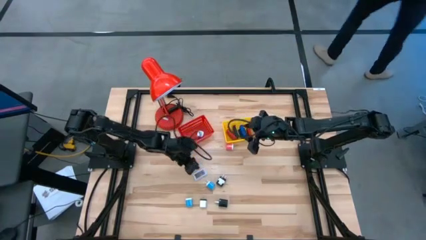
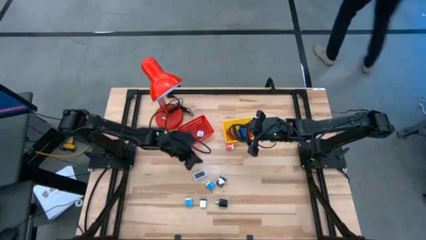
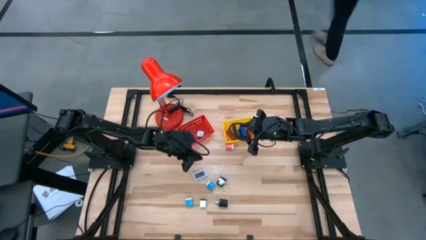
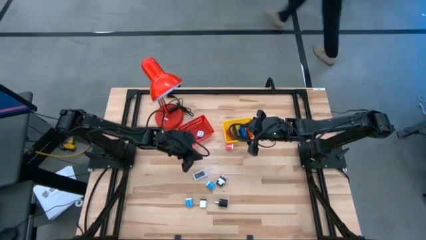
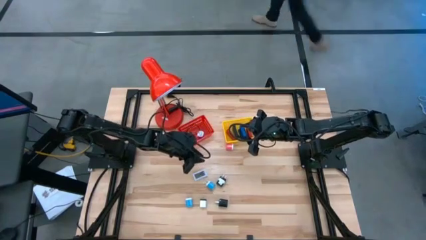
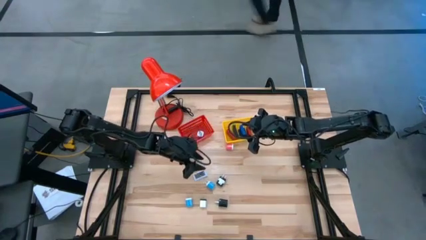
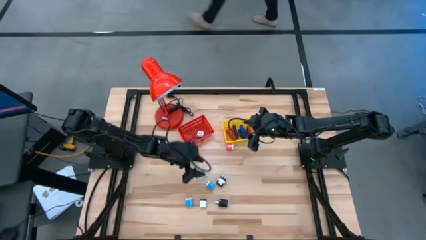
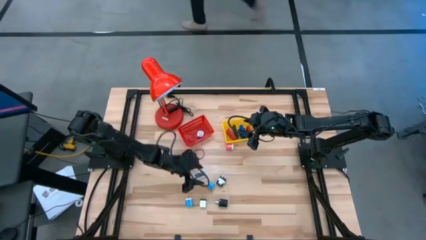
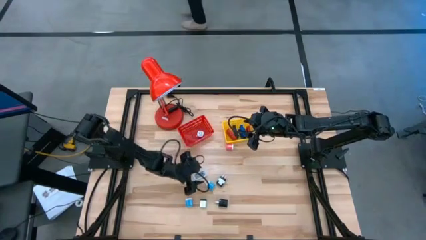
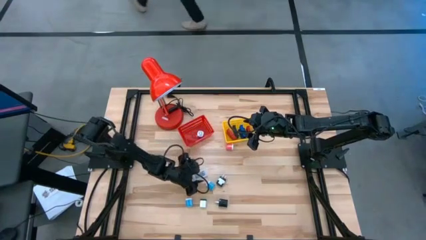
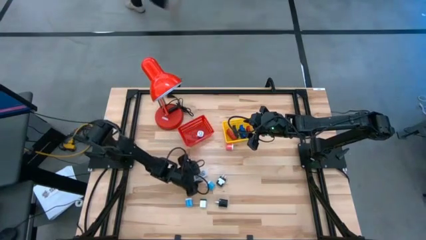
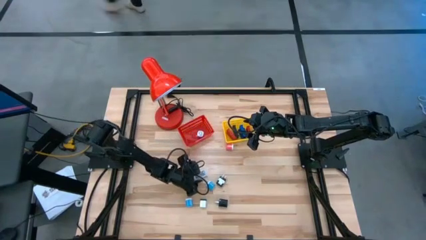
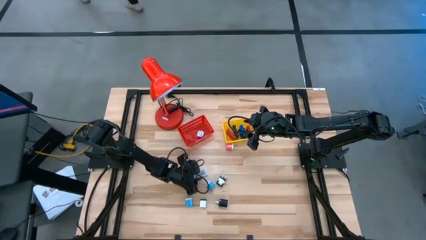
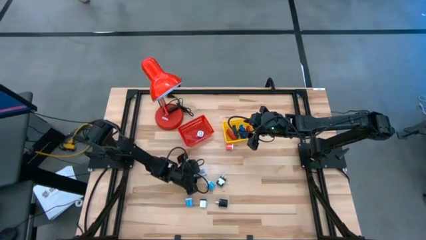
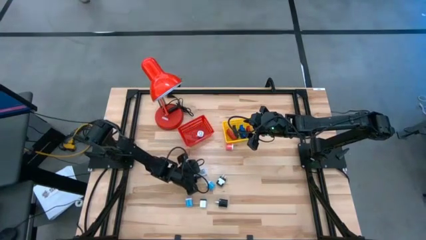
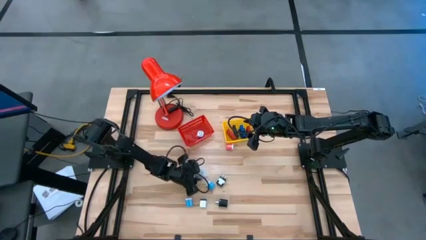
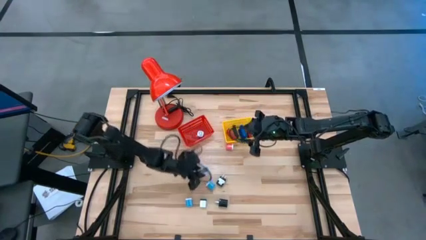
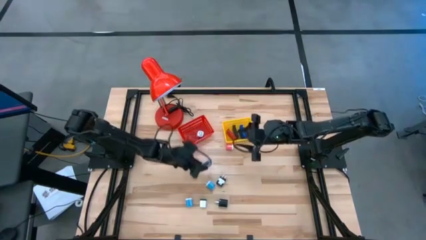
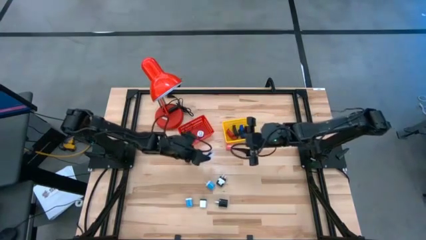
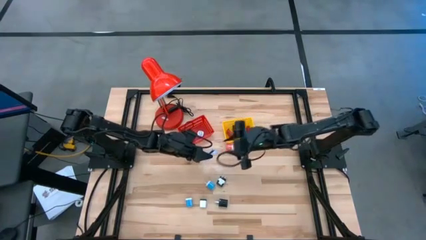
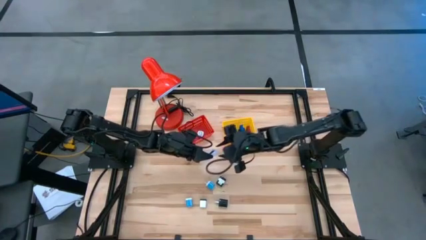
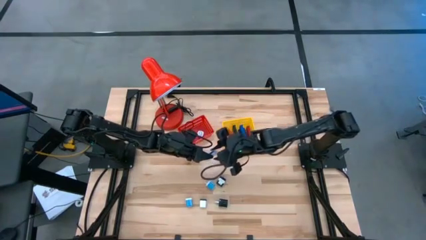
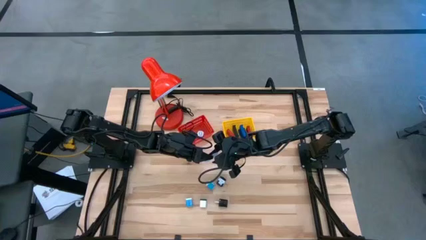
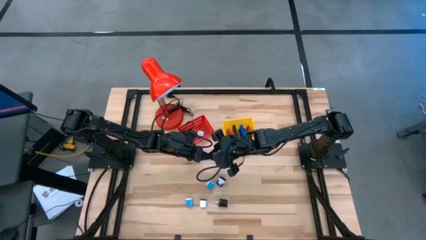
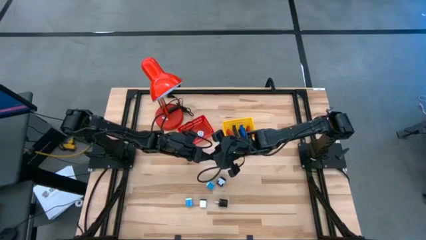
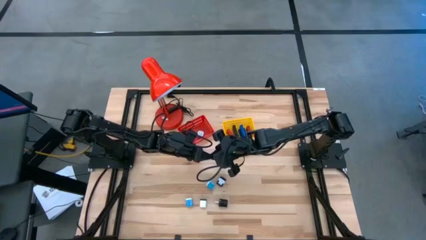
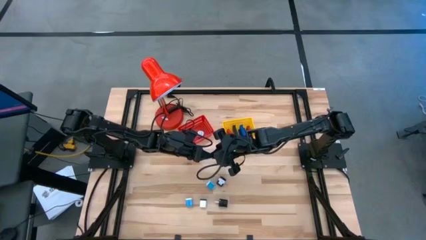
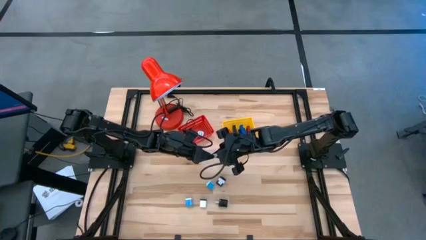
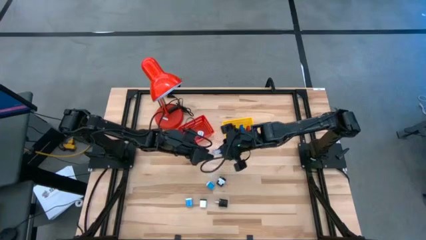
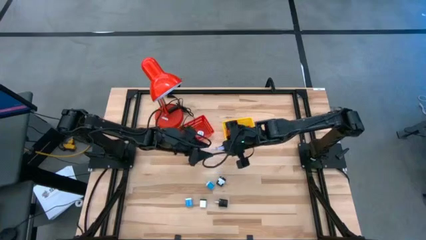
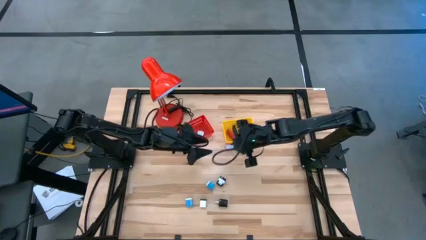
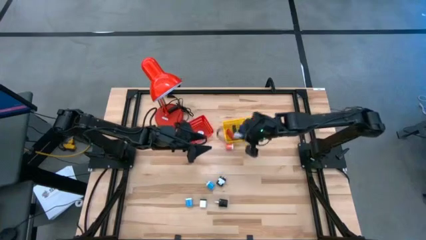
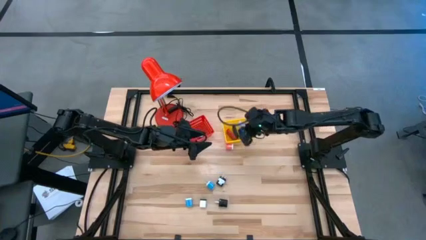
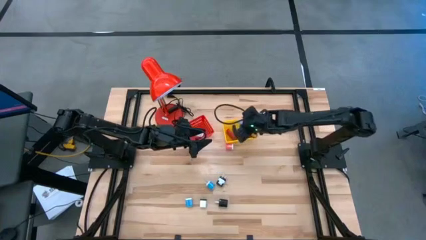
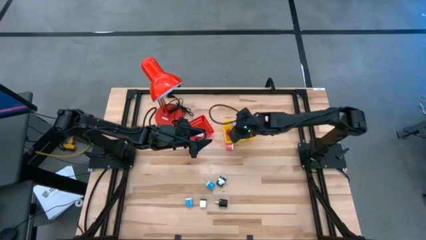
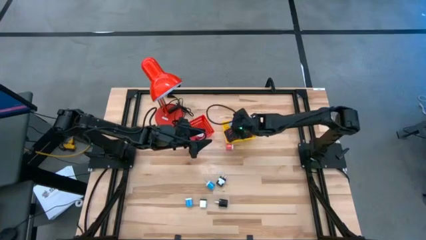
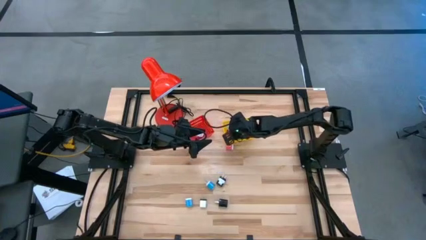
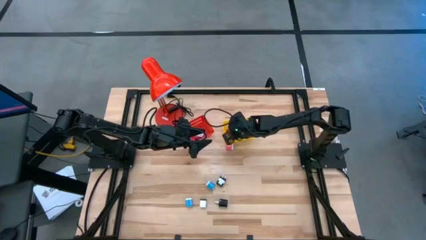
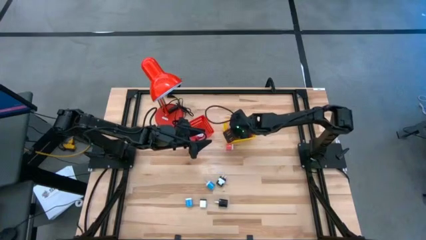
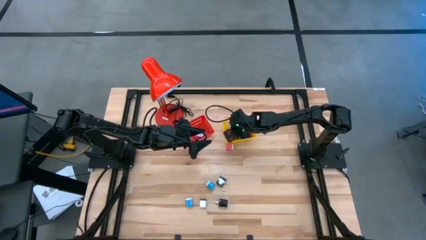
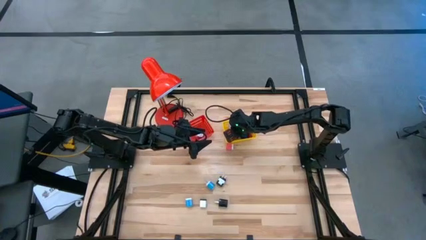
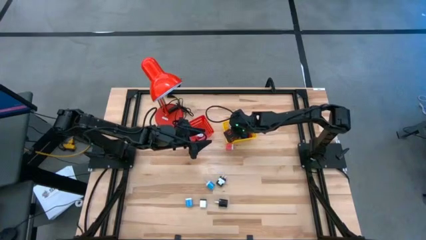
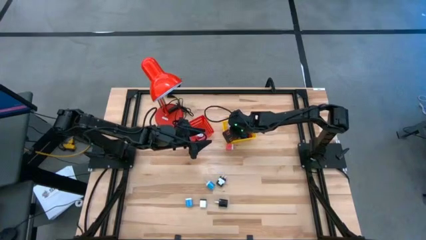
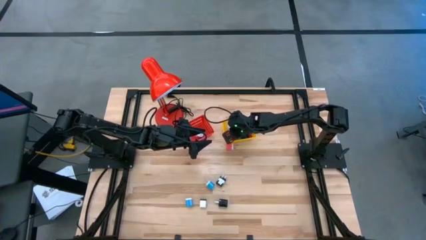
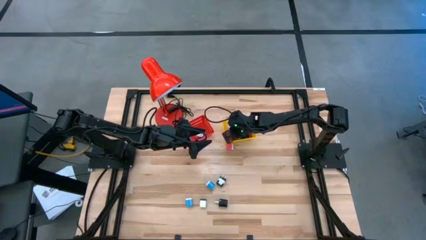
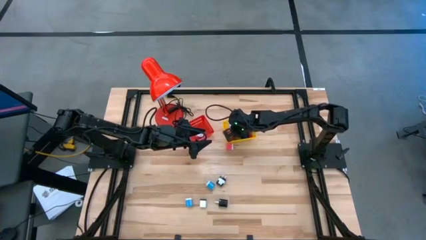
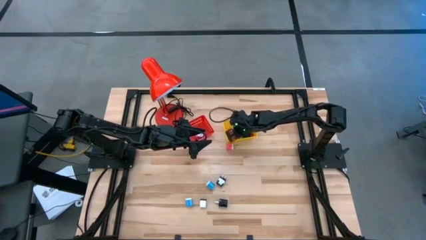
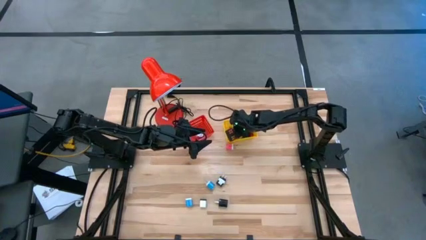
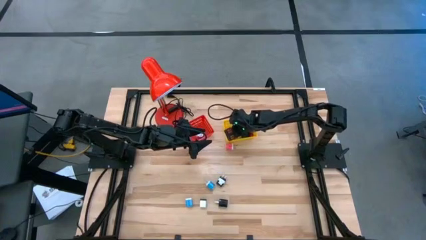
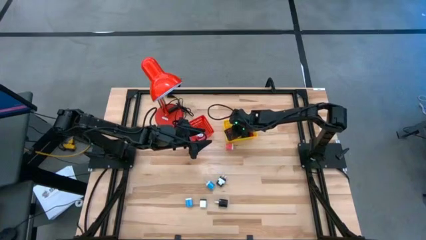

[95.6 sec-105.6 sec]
Task: Pick & Place Office items
Put the white digital timer into the yellow bin
